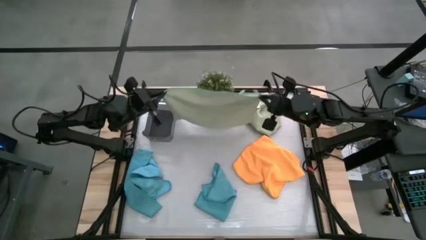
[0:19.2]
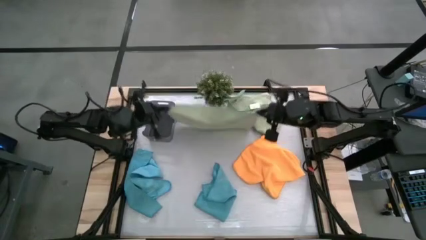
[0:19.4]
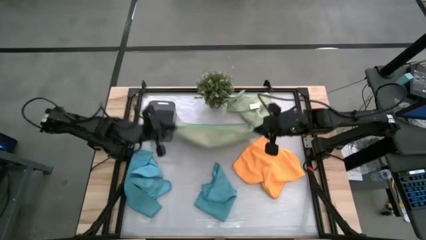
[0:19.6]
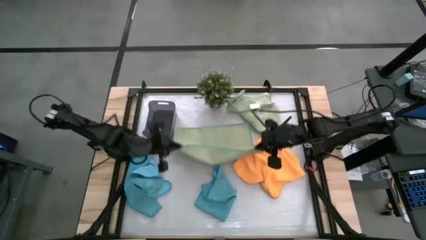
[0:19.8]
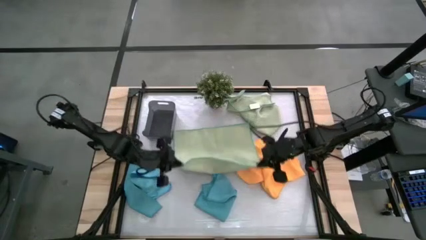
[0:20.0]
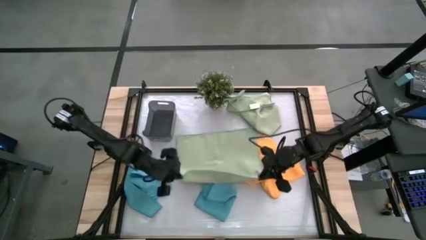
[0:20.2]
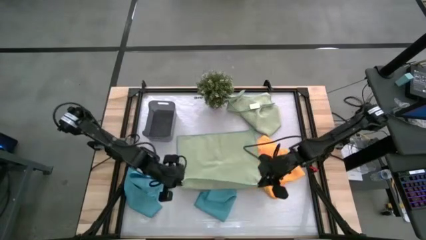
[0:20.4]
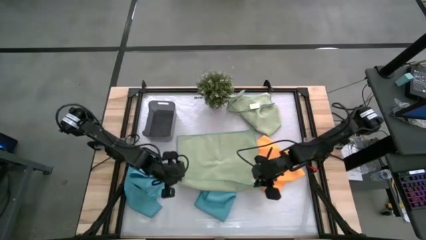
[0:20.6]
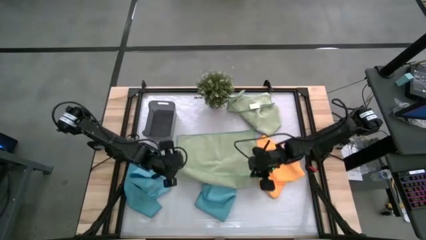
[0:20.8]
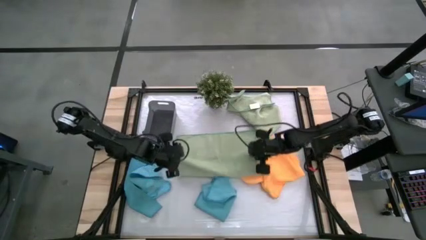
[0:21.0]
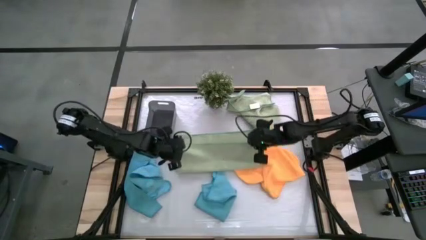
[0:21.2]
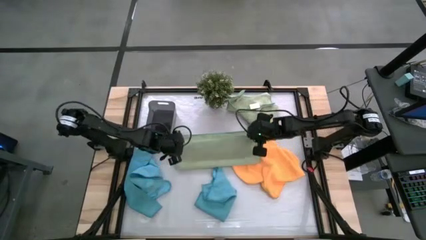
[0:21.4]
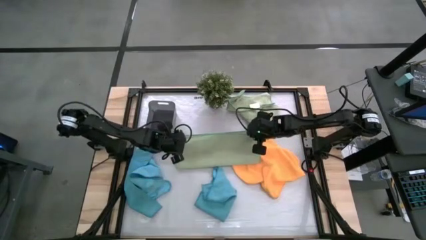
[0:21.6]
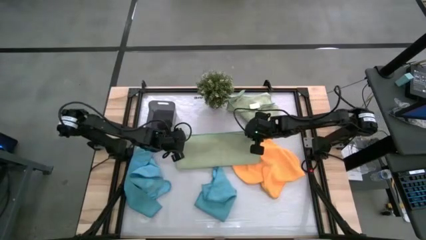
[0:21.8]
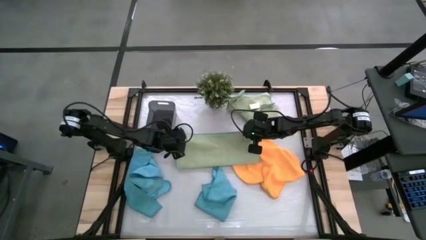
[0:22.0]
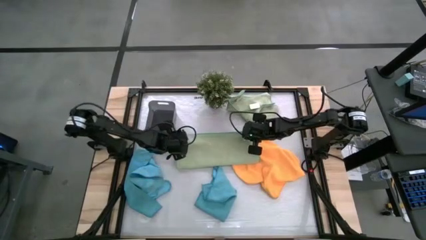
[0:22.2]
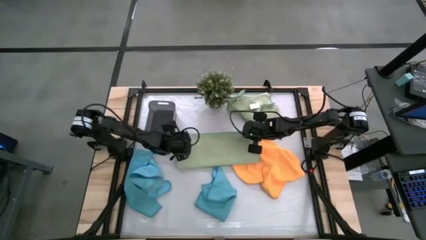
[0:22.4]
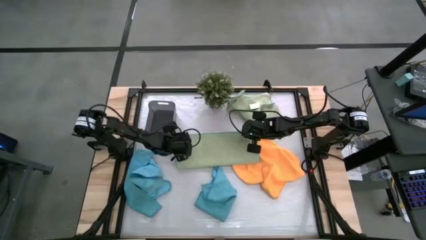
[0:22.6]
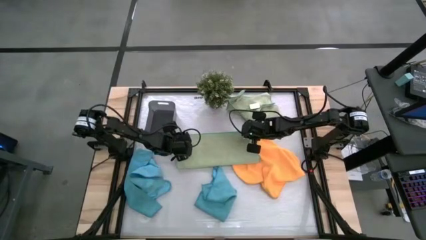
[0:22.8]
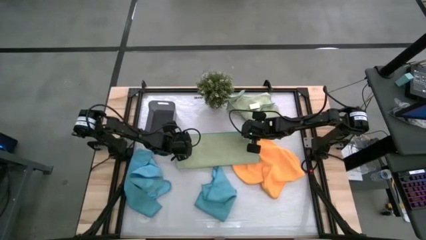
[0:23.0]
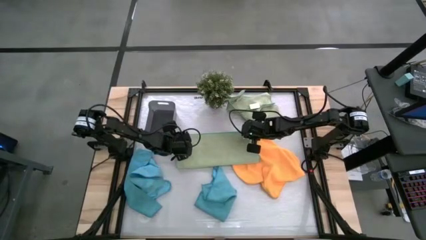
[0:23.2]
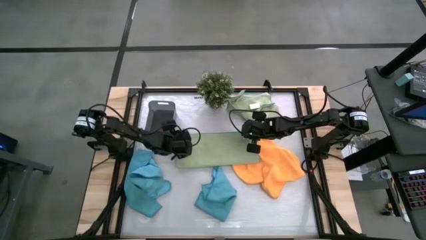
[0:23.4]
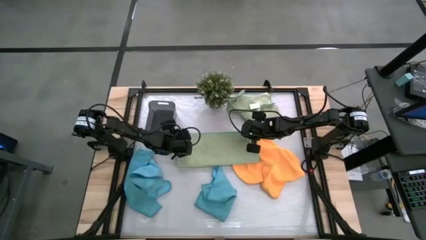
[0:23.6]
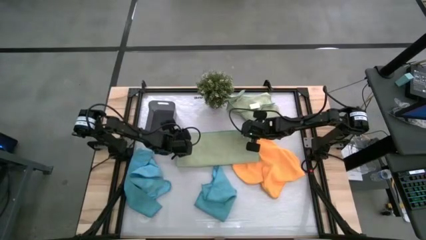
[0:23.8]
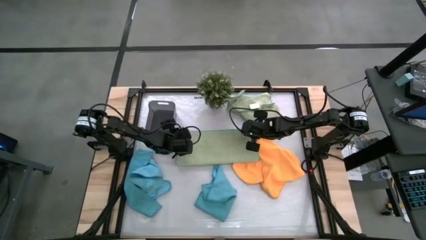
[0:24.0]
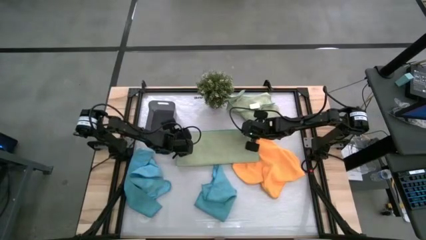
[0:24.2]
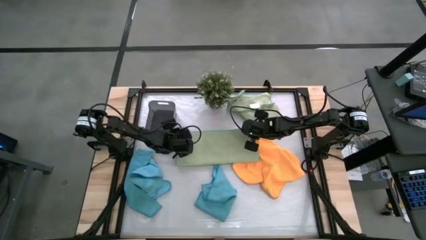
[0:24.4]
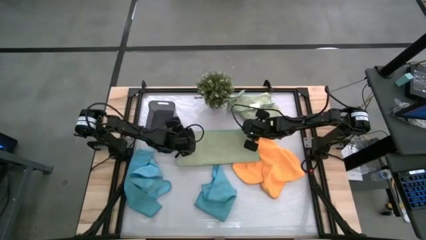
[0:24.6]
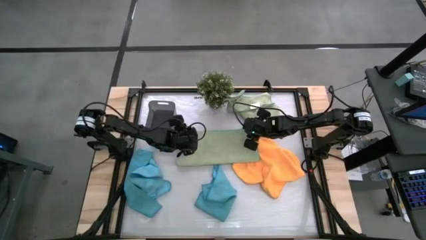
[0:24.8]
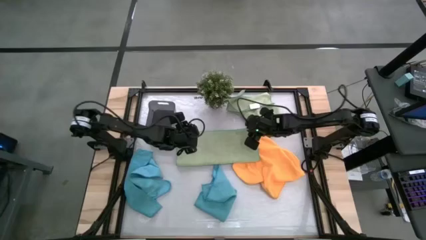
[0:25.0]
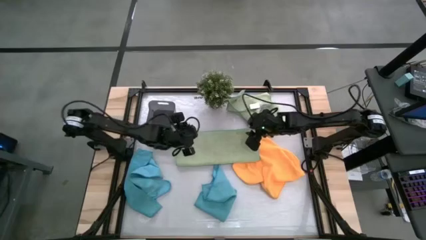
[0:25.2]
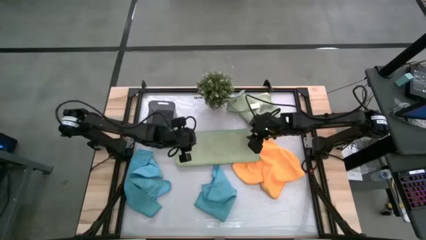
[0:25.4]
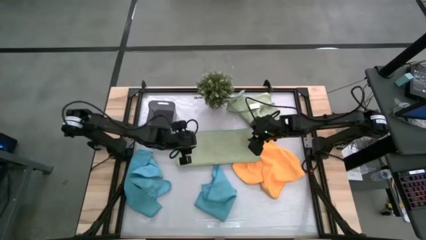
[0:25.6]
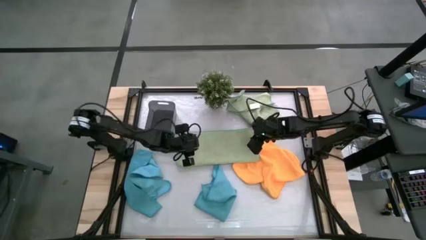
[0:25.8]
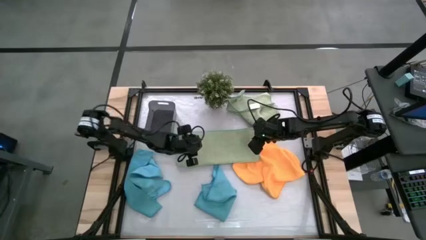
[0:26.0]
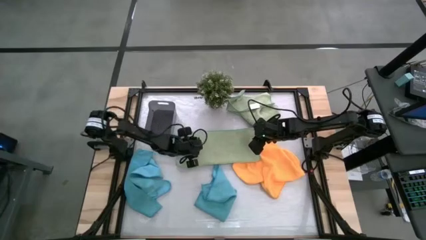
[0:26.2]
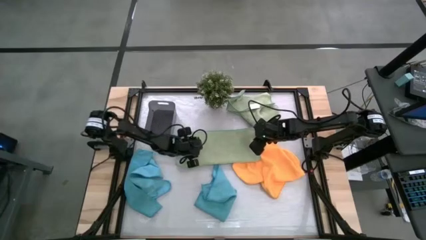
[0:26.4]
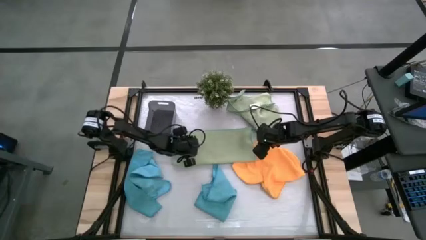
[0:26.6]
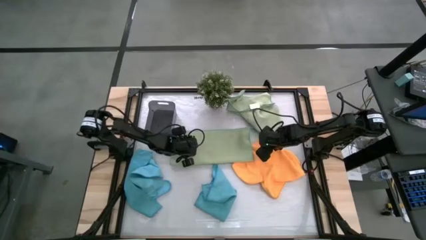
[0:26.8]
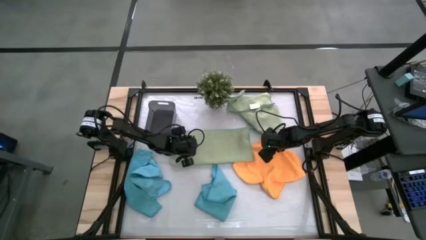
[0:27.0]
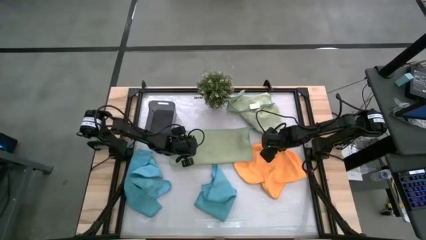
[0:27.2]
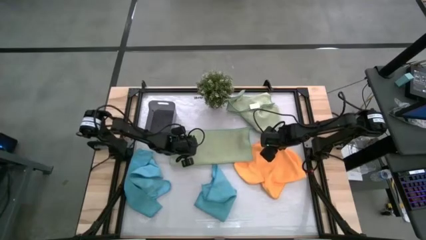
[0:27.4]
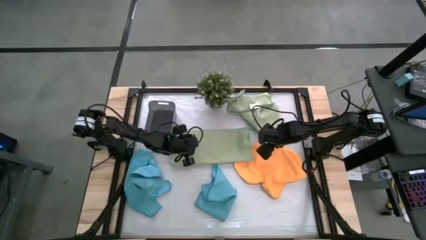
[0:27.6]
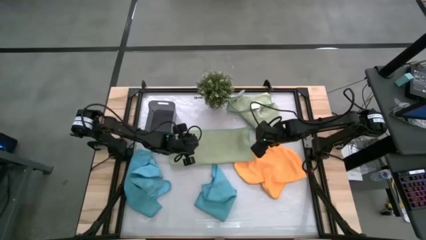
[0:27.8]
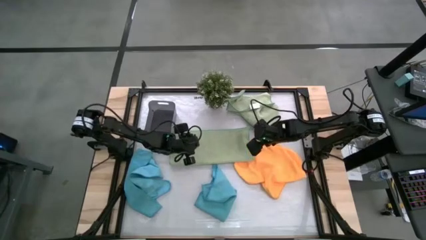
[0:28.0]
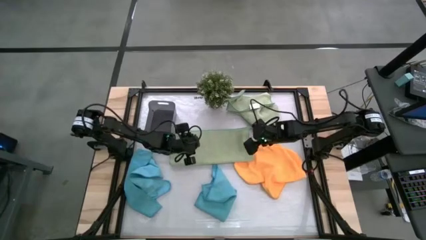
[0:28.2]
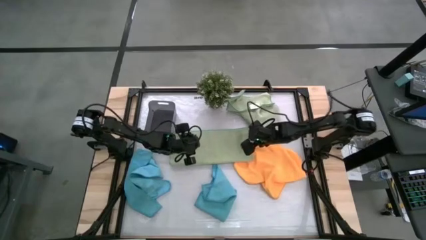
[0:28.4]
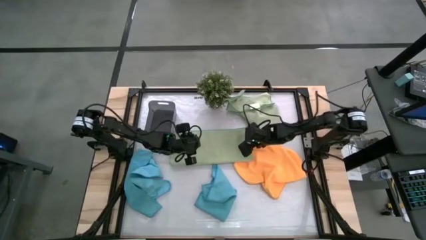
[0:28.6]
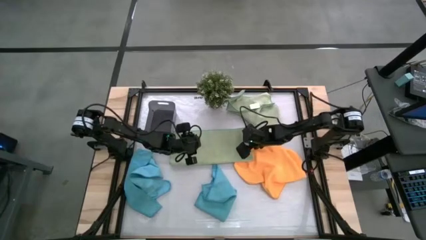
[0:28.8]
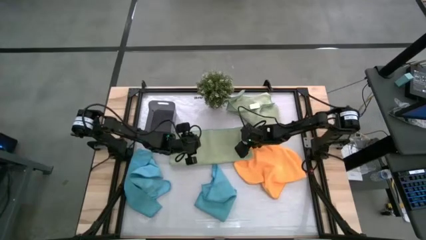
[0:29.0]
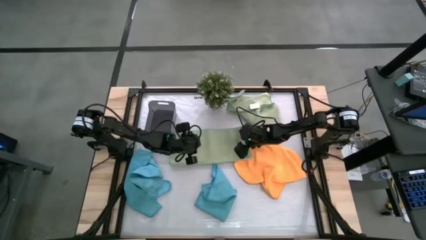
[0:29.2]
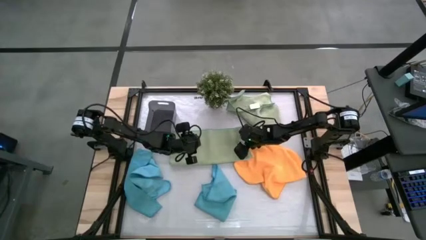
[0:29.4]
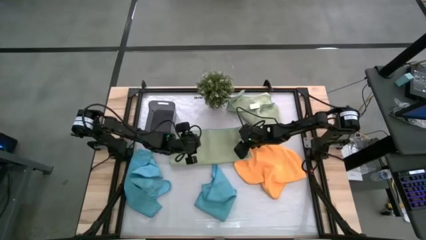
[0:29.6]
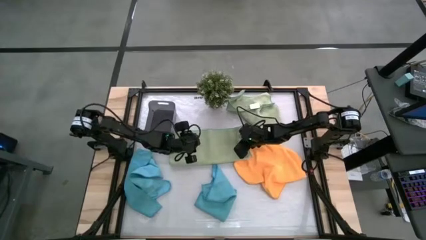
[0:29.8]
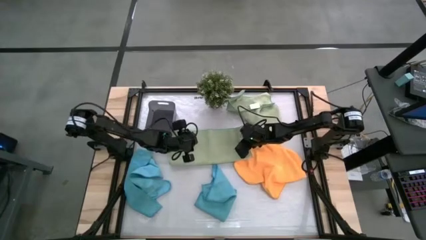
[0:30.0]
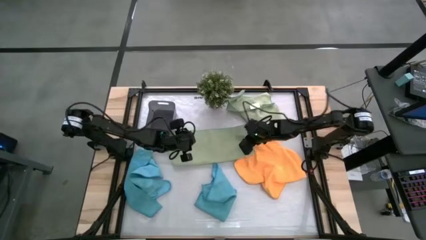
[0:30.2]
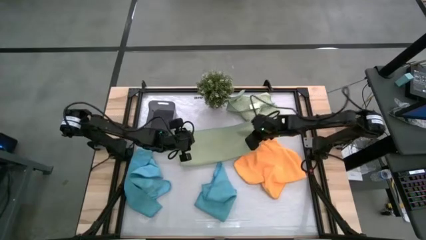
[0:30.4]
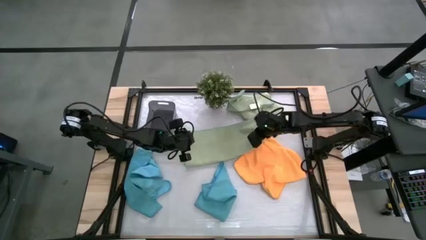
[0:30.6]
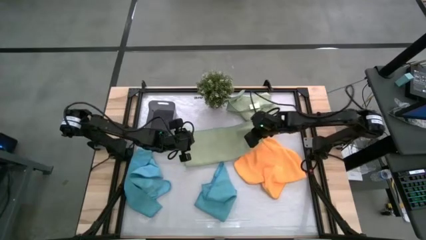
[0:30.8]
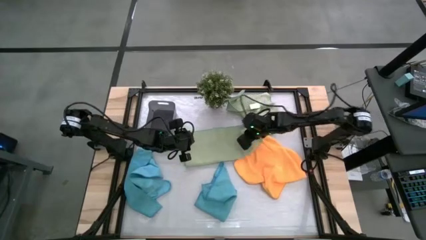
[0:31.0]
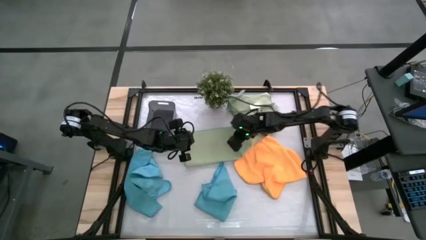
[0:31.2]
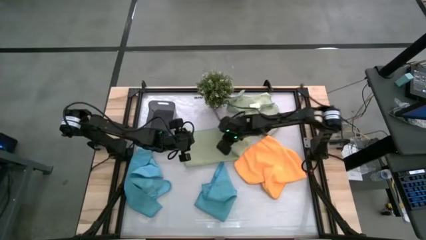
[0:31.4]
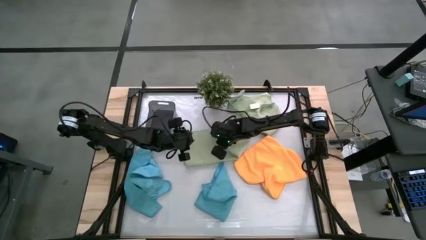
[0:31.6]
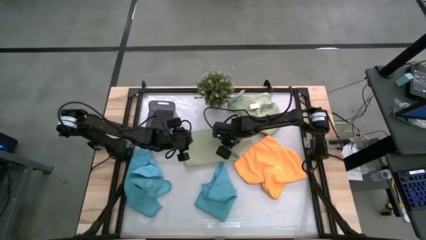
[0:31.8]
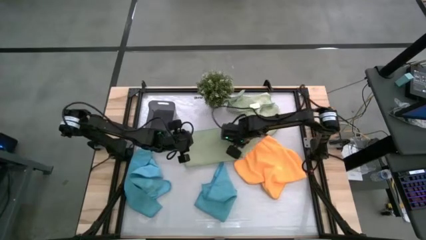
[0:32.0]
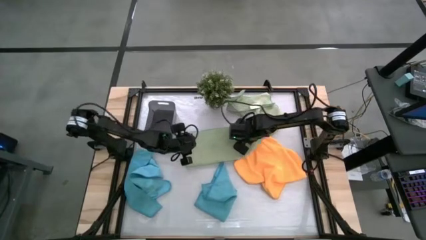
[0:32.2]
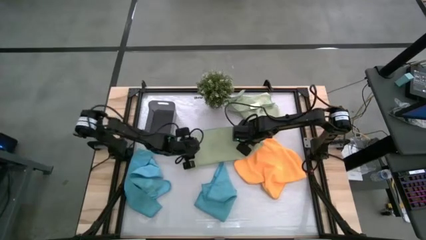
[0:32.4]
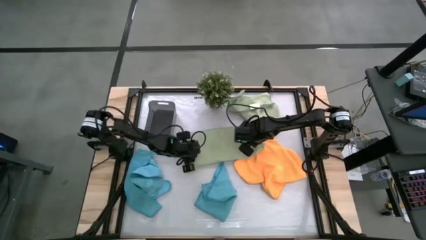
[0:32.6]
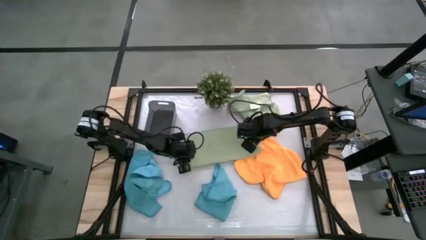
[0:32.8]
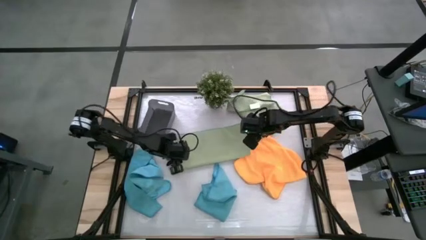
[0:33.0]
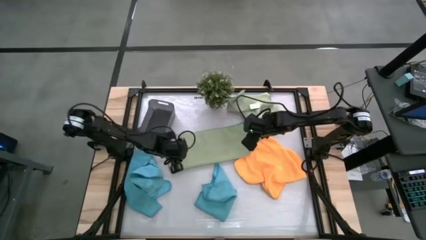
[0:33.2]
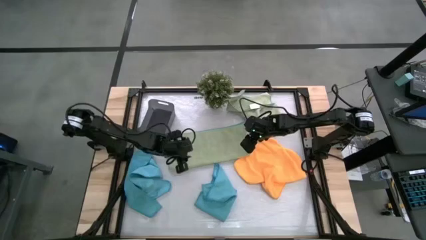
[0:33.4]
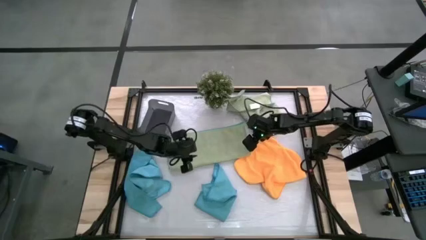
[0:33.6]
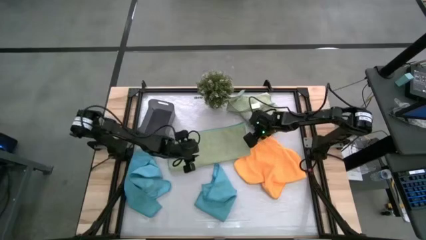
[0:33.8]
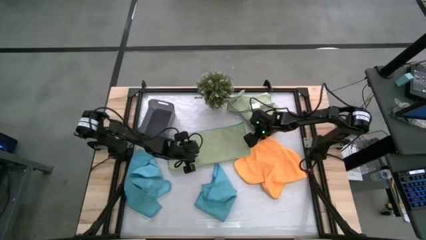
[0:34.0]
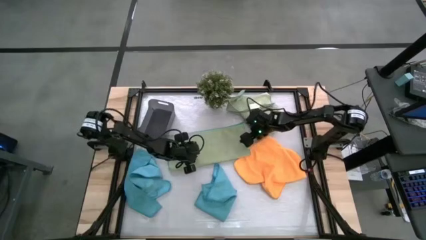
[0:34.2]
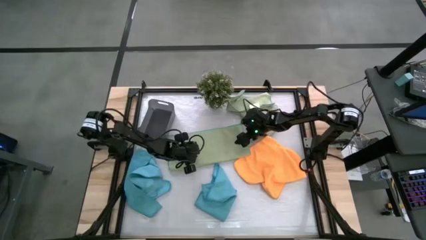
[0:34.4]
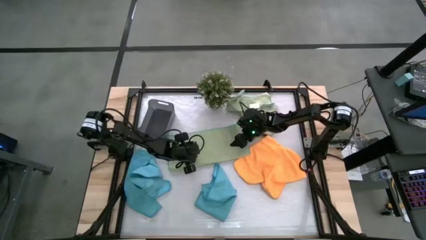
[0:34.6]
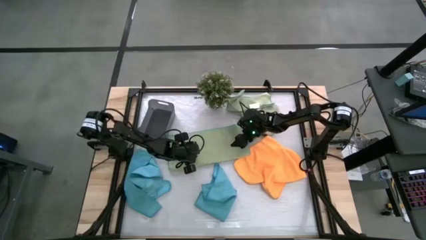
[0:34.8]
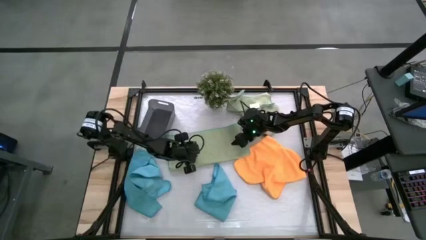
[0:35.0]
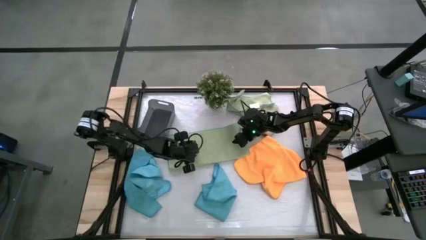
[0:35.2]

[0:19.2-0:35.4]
Task: Fold microfiber towels
Fold the left green microfiber cloth
